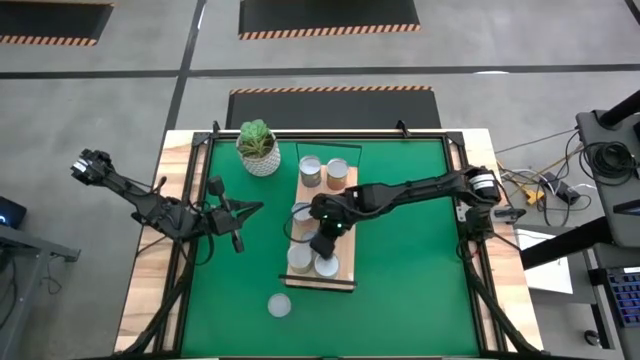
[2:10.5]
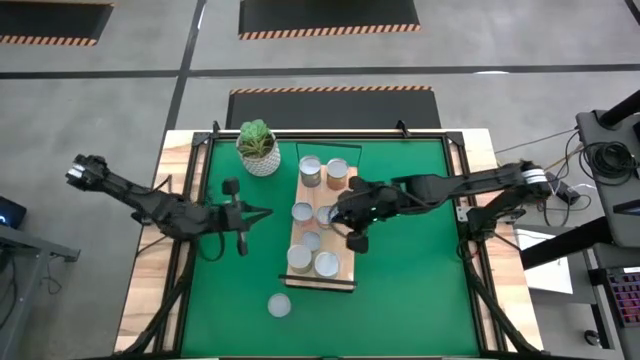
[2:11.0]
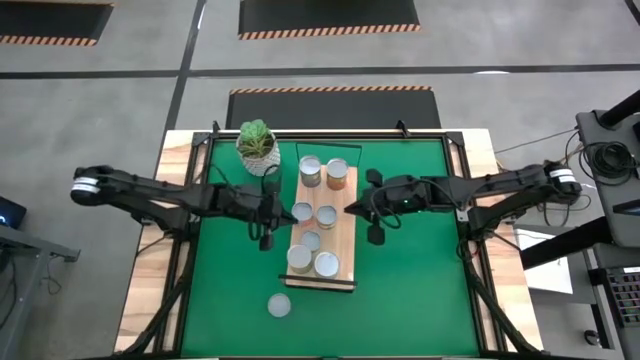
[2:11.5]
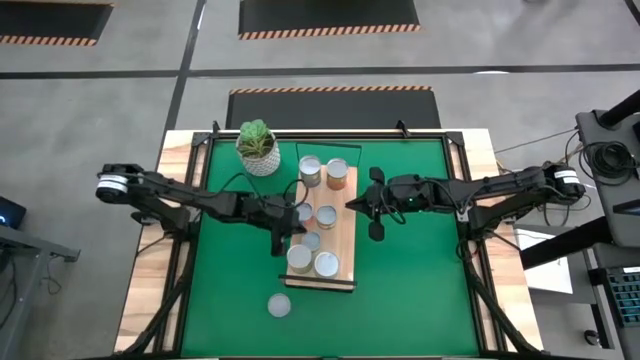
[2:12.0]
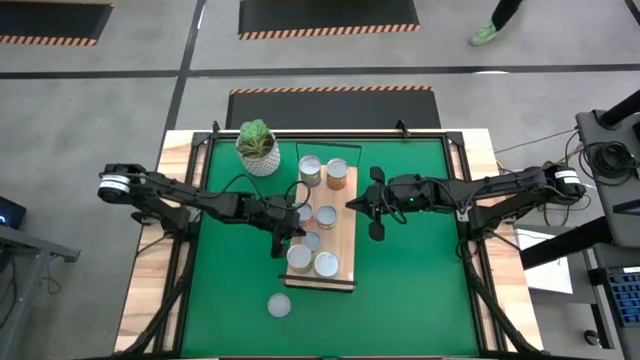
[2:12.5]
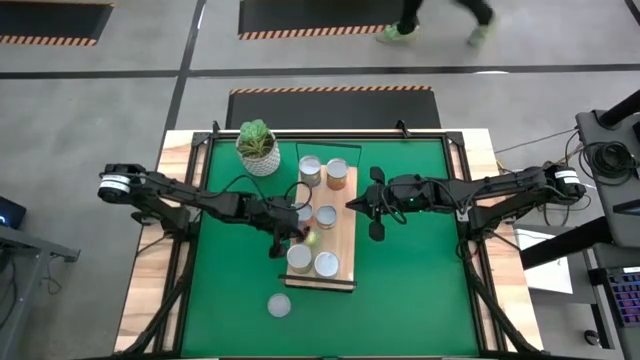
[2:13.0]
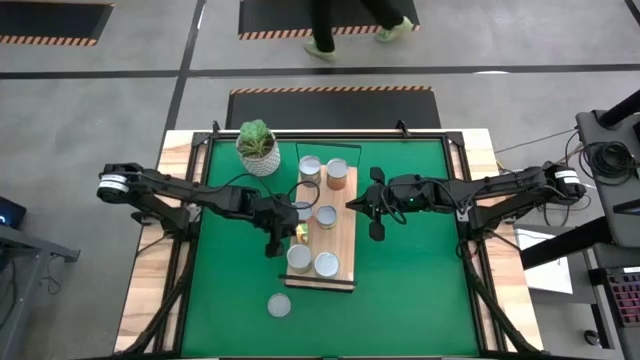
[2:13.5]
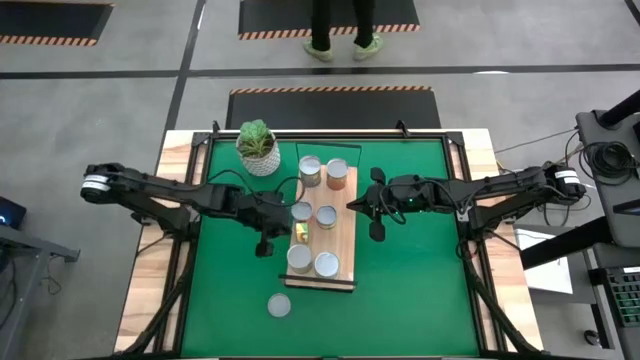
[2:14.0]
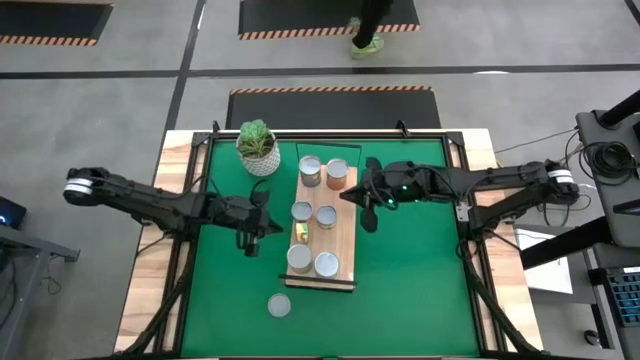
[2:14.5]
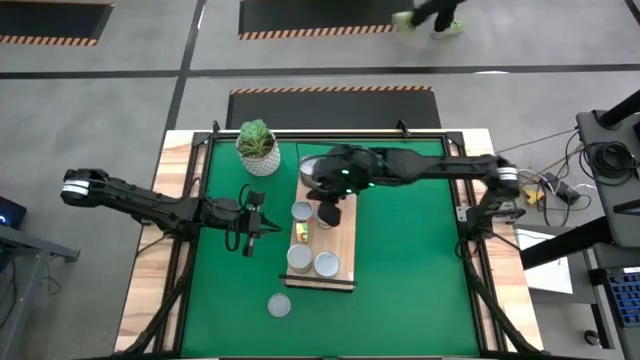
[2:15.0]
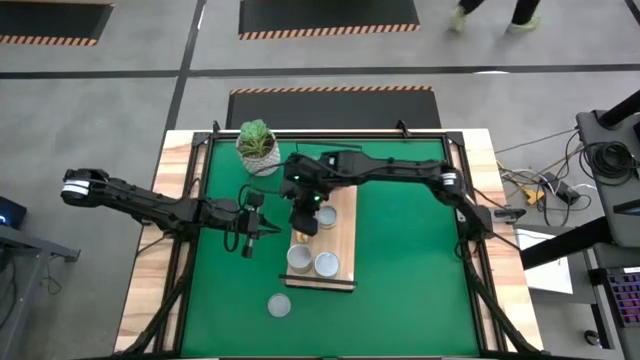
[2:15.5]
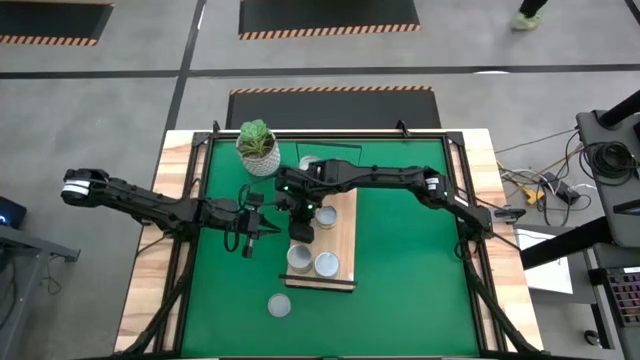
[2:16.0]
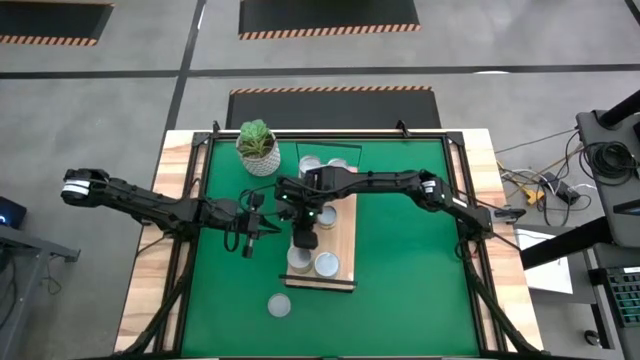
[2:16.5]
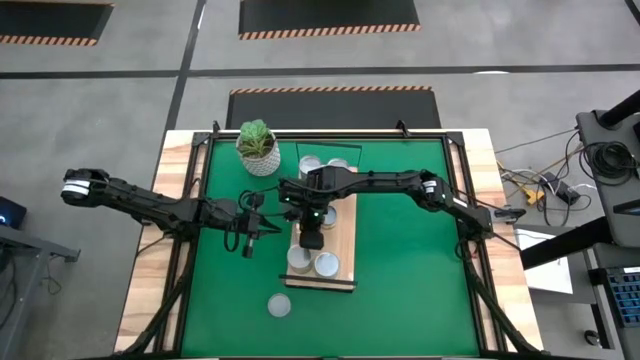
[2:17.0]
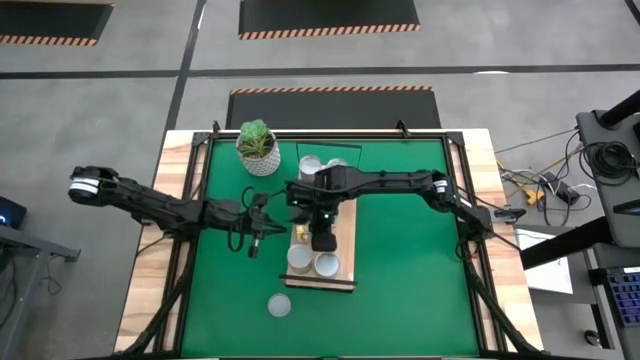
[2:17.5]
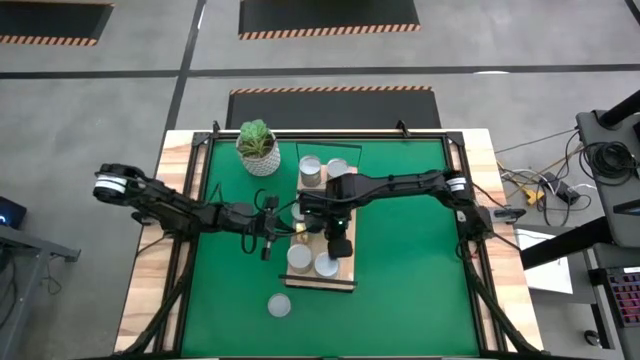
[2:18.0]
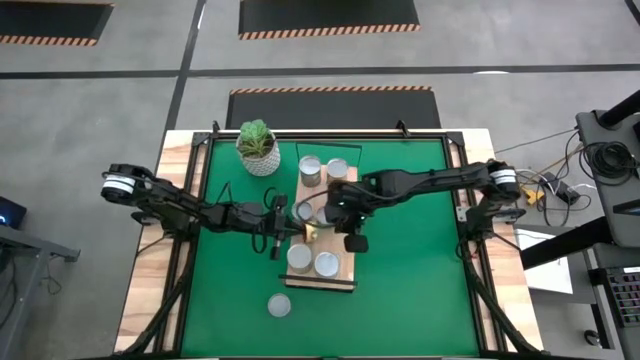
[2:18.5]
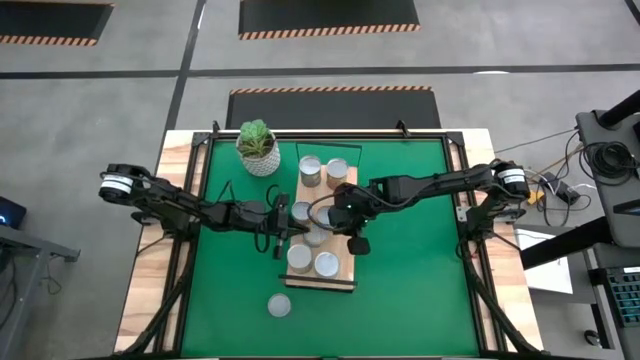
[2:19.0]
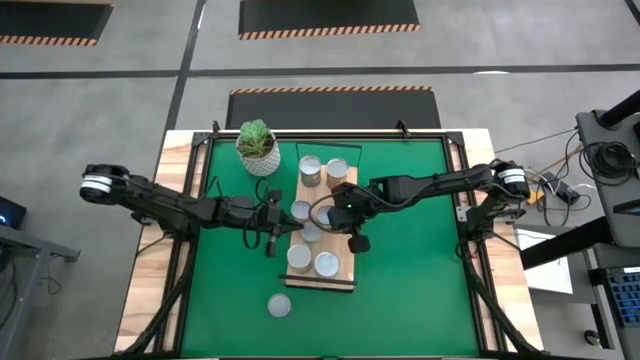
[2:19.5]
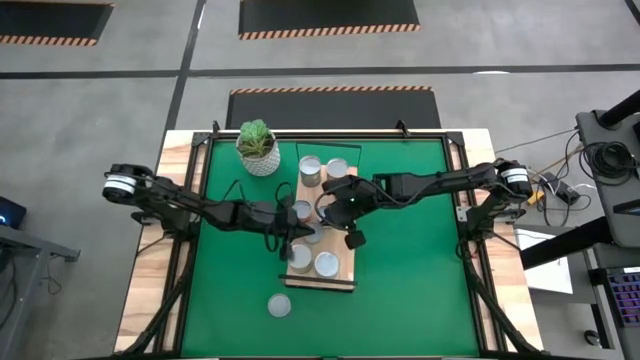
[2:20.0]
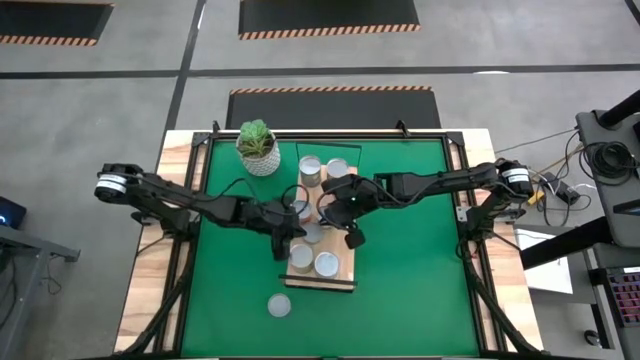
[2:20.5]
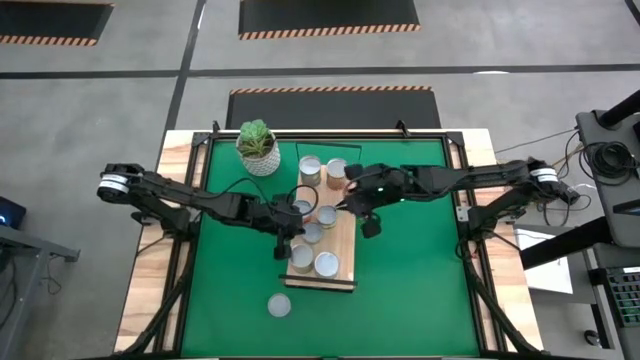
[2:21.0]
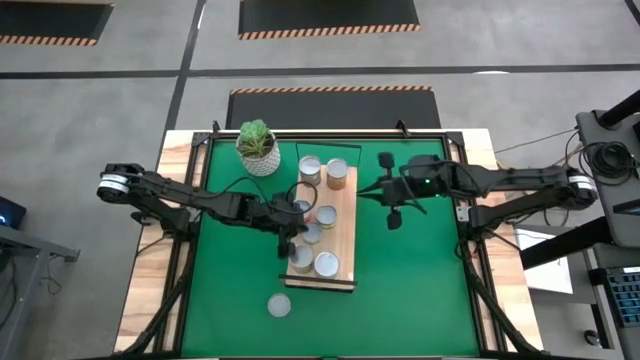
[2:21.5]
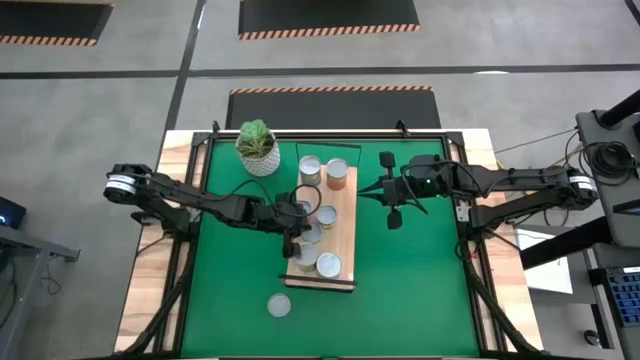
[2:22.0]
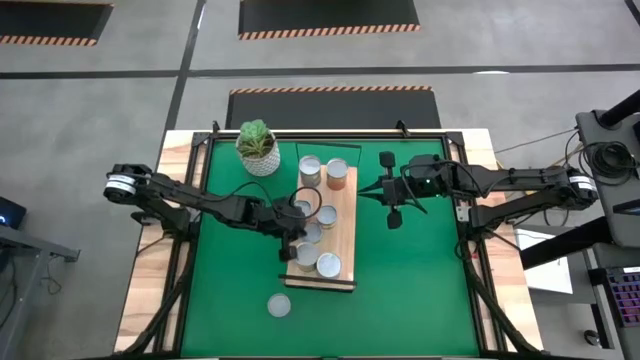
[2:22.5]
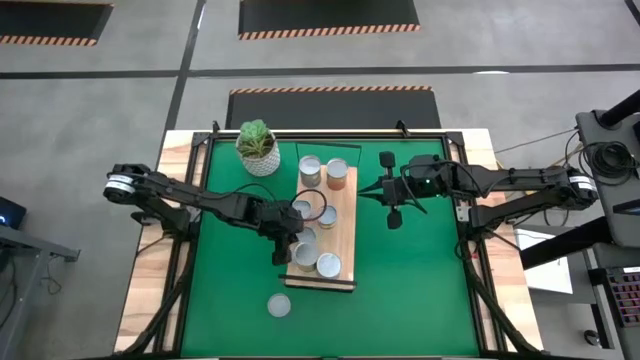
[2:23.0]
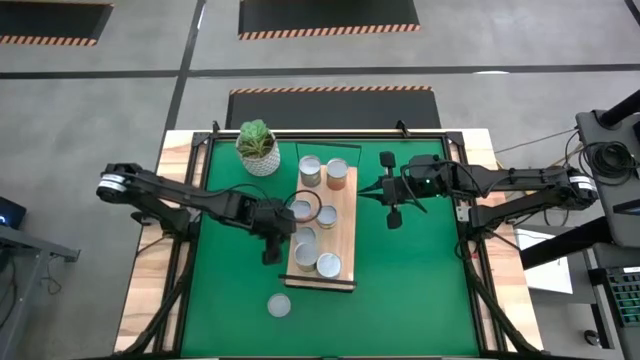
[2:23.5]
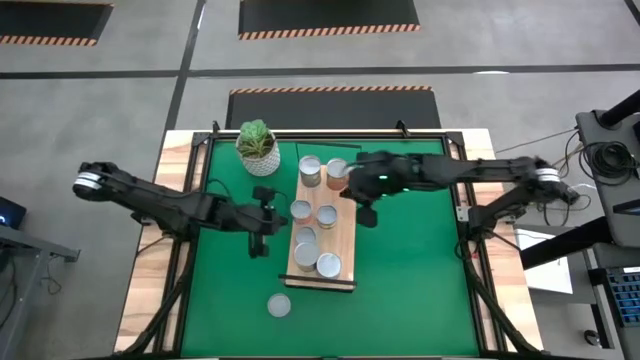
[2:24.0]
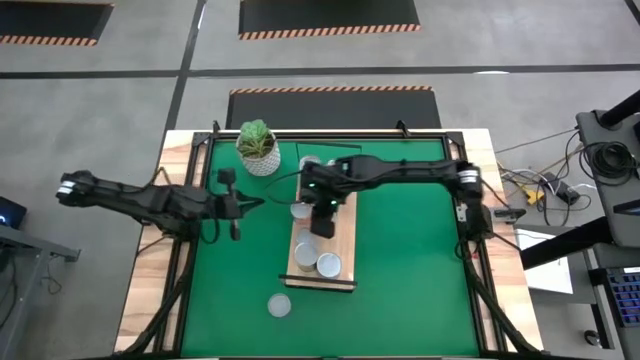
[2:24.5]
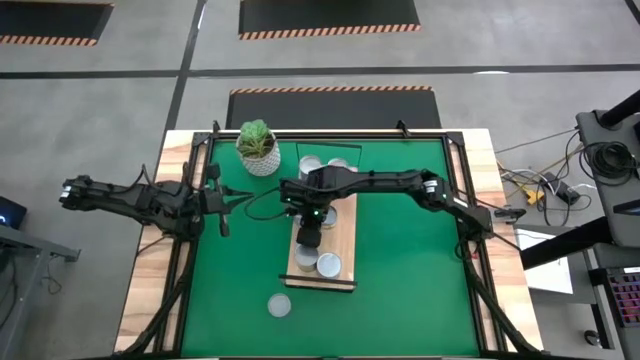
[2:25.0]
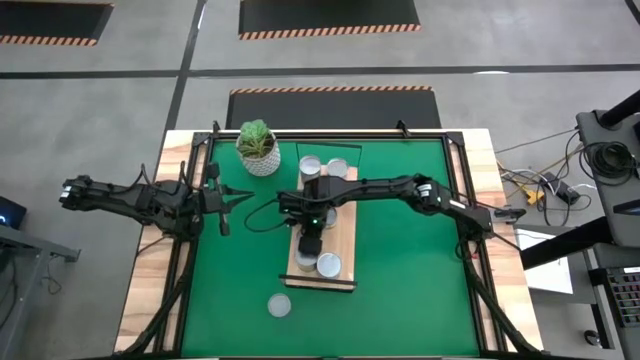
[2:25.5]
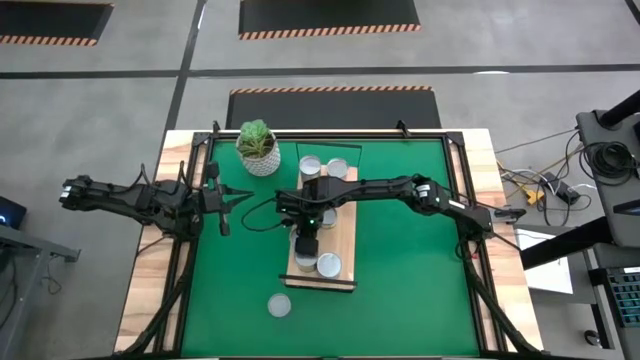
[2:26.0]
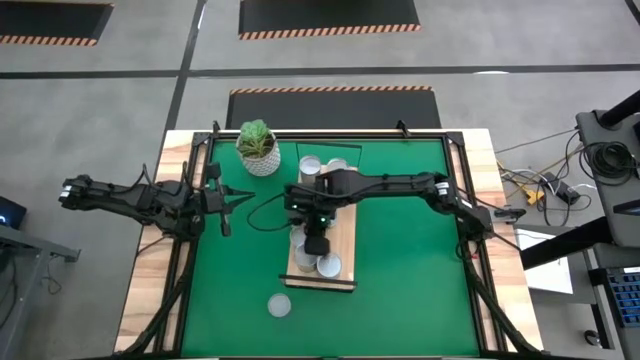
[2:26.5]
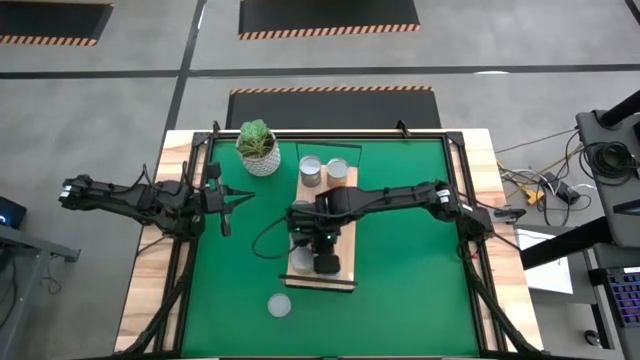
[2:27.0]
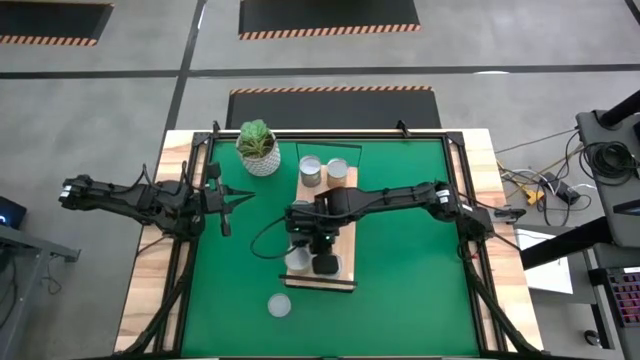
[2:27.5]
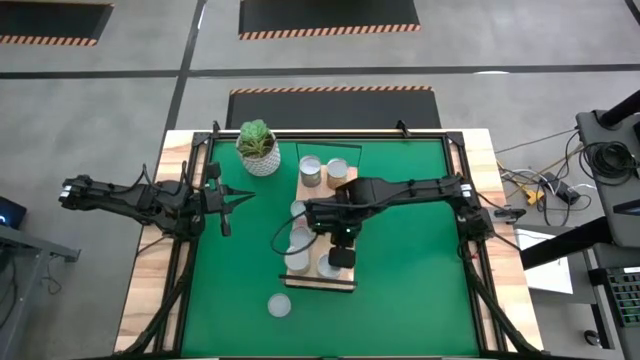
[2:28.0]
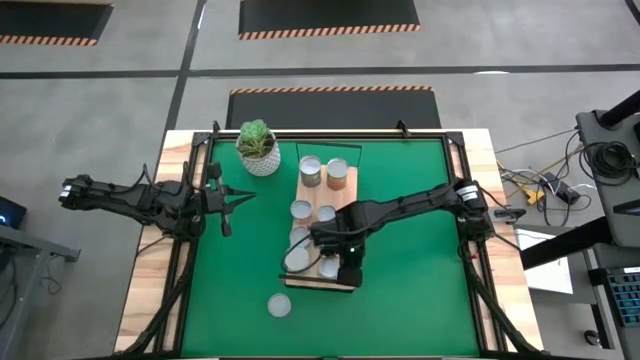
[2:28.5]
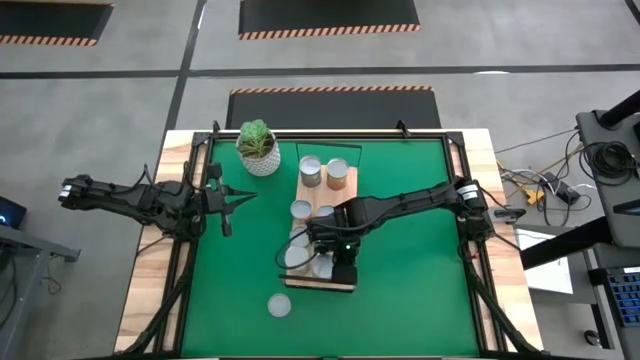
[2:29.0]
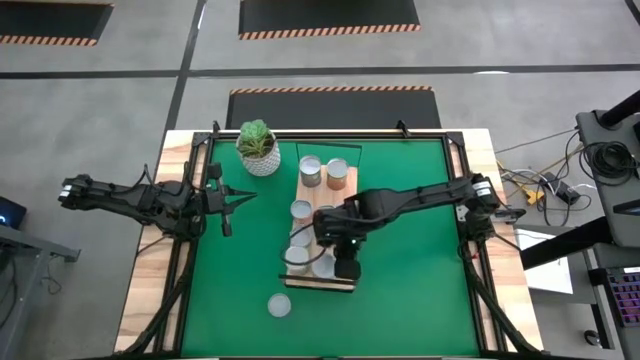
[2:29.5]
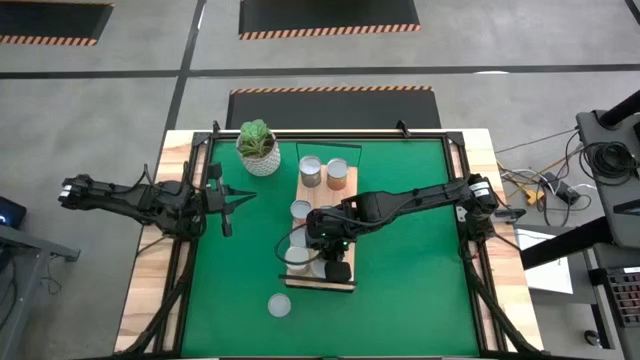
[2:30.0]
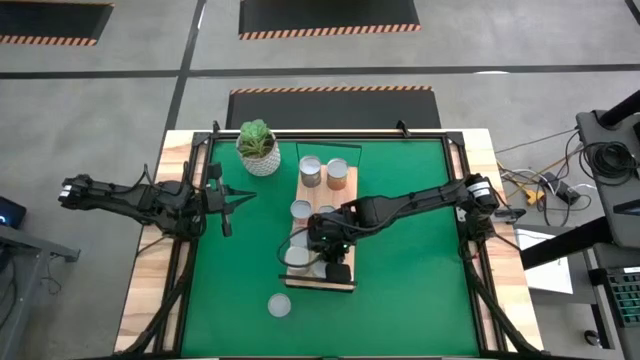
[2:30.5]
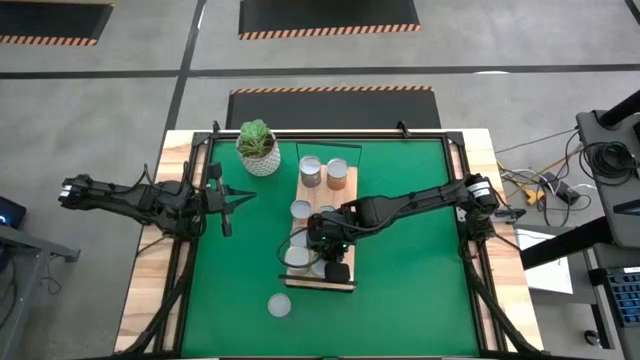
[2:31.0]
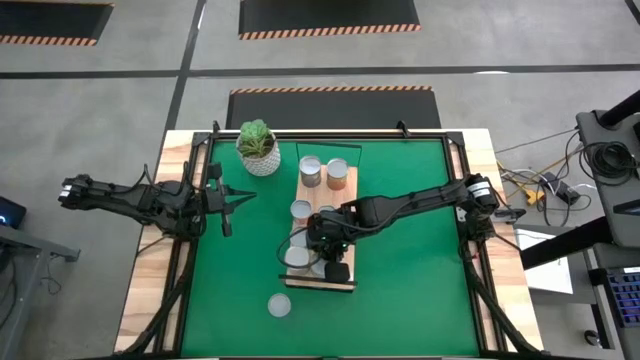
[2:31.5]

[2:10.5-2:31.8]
Task: Pick and place cans onto a shelf
Adjust the canned goods on the shelf

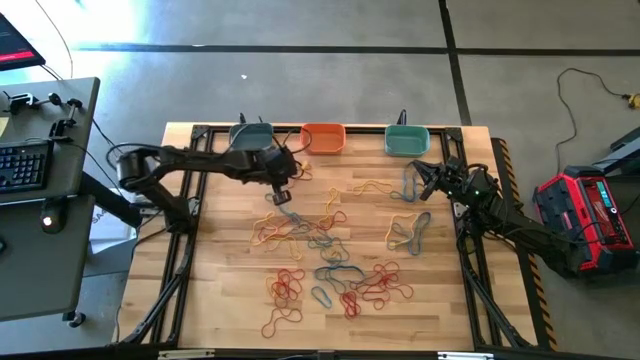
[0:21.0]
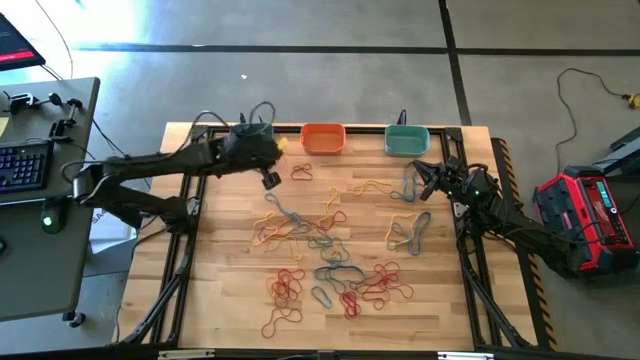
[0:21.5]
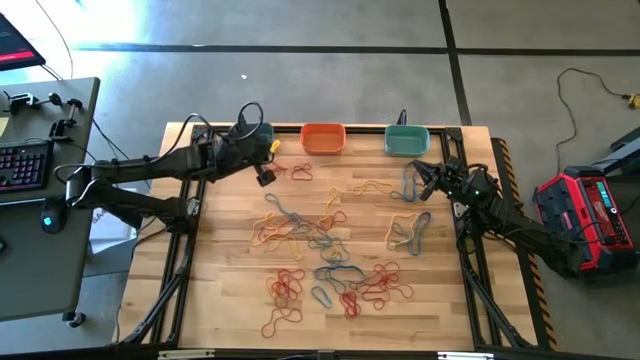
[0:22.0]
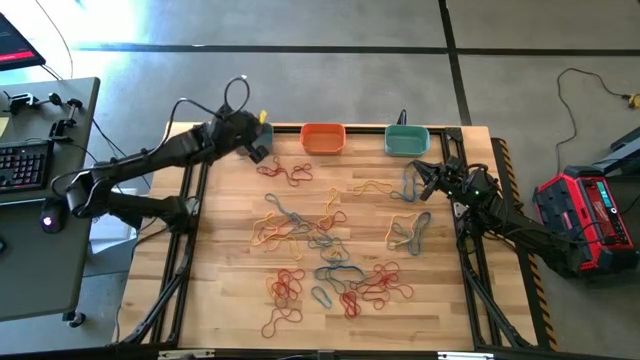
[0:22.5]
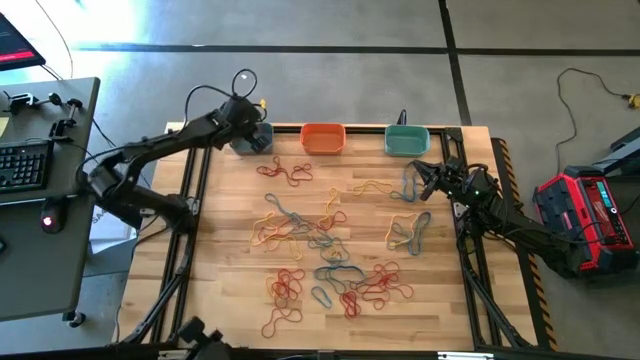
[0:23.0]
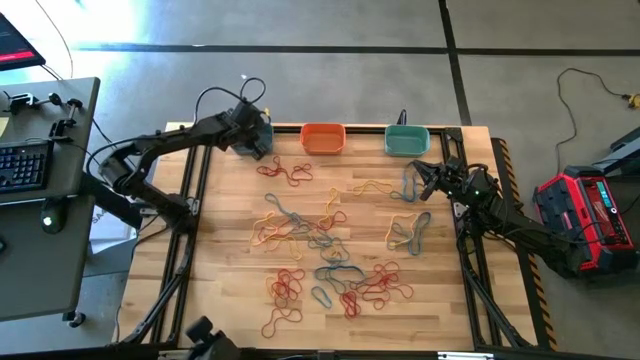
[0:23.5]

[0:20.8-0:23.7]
Task: Sort rubber bands into baskets
Put the red rubber band into the blue bin
